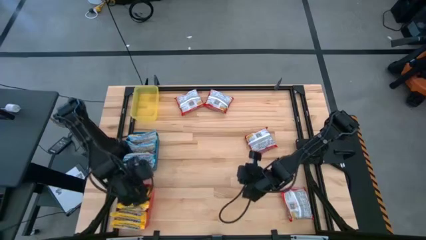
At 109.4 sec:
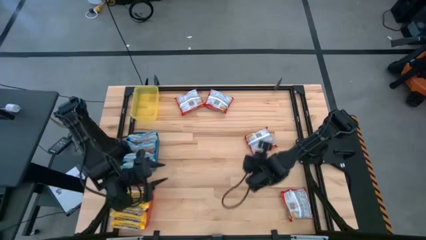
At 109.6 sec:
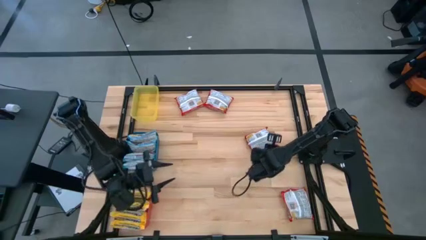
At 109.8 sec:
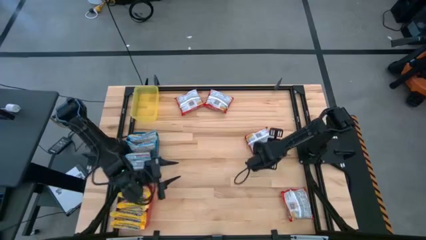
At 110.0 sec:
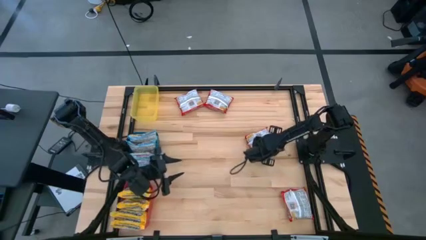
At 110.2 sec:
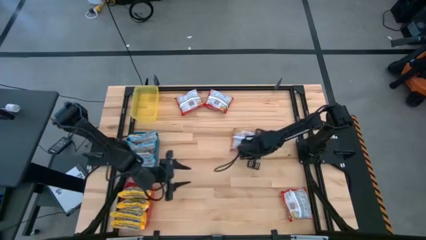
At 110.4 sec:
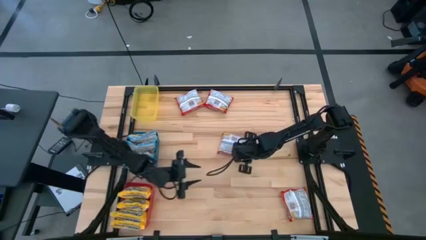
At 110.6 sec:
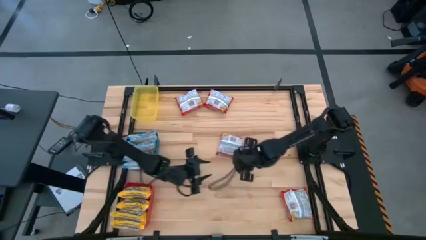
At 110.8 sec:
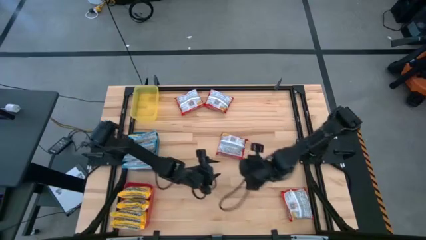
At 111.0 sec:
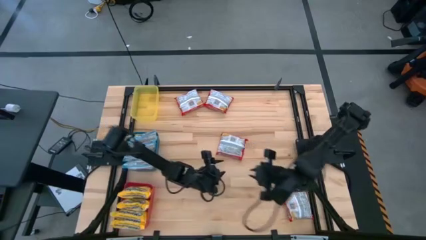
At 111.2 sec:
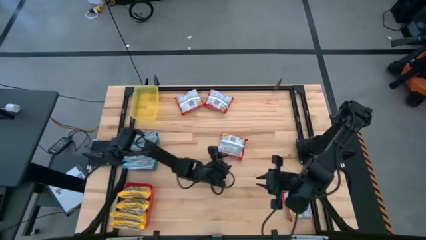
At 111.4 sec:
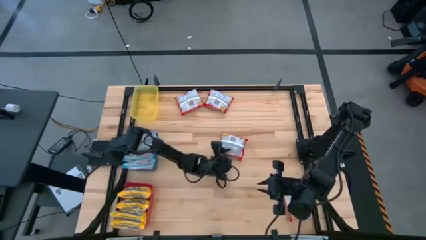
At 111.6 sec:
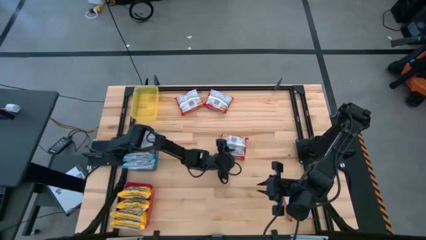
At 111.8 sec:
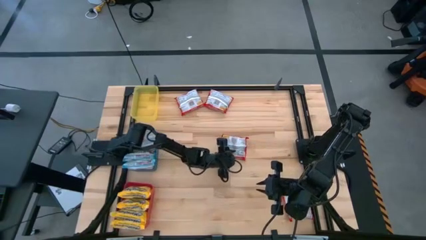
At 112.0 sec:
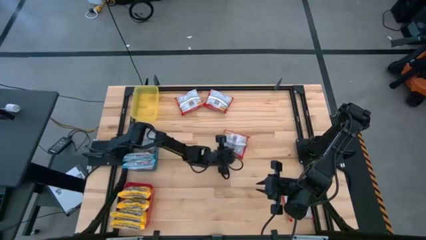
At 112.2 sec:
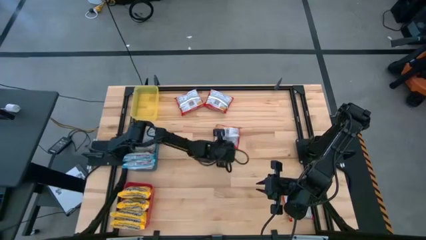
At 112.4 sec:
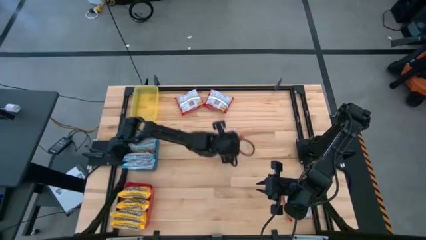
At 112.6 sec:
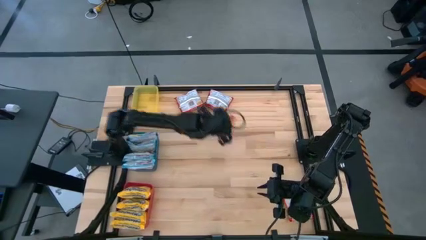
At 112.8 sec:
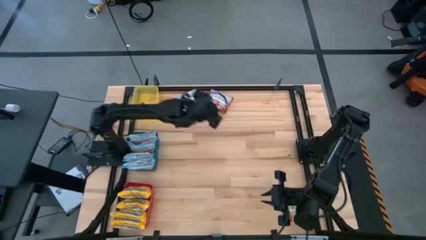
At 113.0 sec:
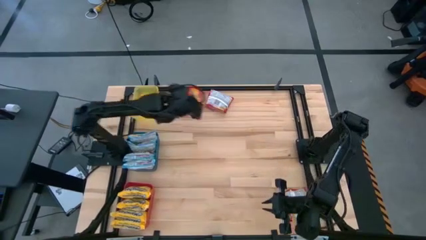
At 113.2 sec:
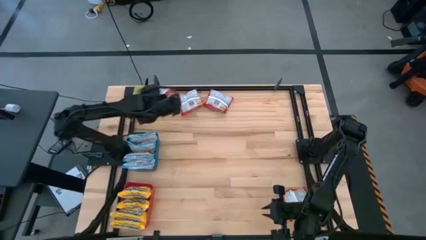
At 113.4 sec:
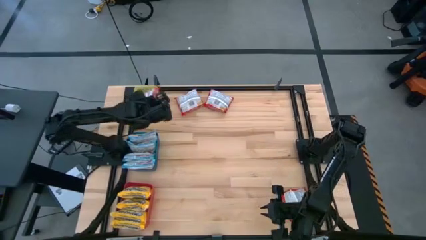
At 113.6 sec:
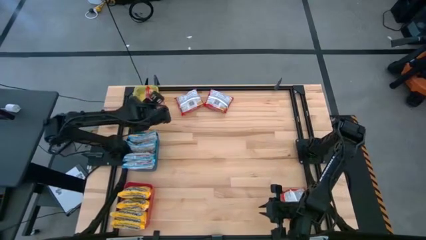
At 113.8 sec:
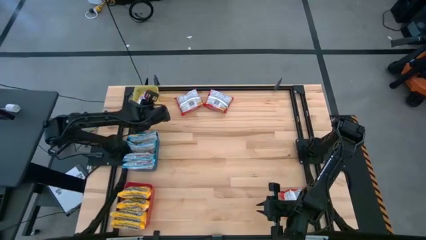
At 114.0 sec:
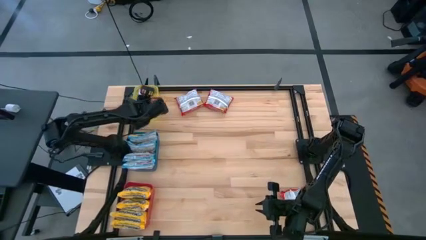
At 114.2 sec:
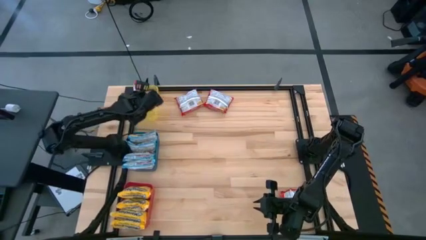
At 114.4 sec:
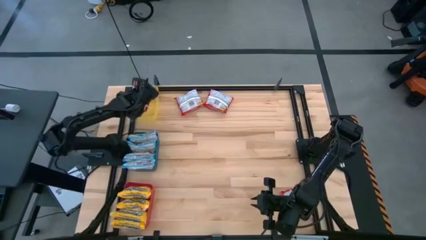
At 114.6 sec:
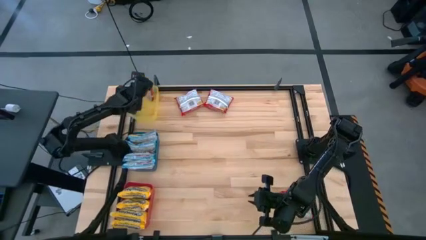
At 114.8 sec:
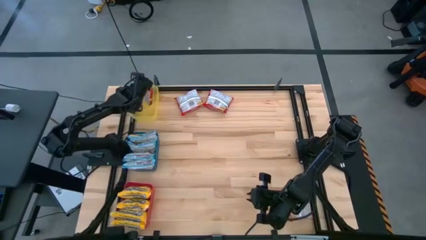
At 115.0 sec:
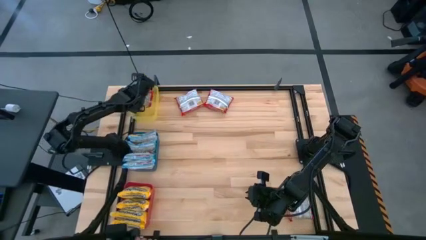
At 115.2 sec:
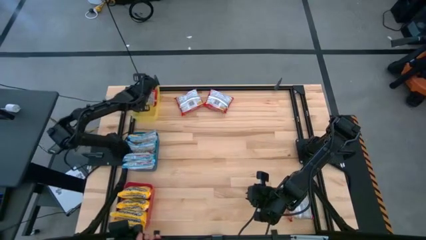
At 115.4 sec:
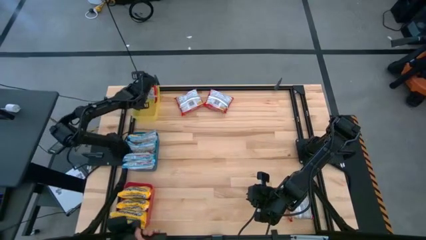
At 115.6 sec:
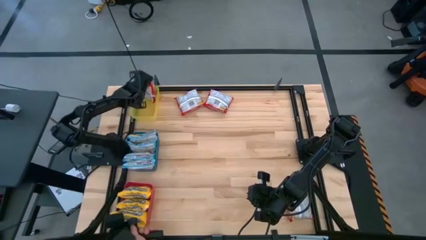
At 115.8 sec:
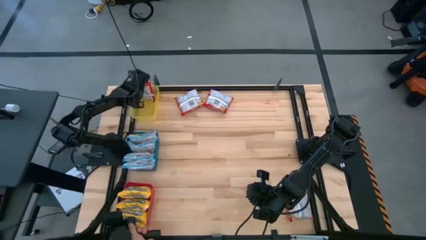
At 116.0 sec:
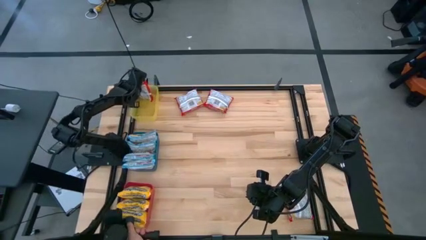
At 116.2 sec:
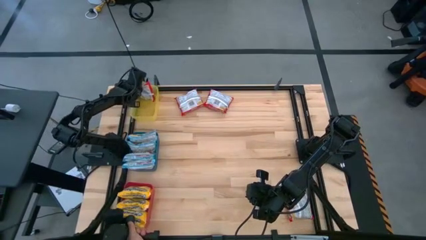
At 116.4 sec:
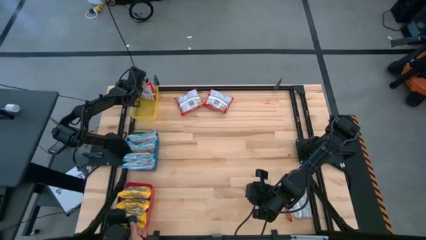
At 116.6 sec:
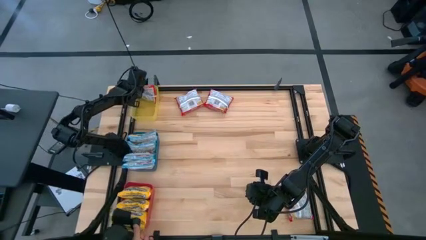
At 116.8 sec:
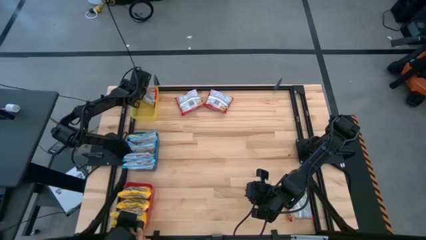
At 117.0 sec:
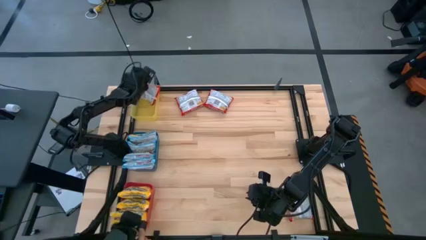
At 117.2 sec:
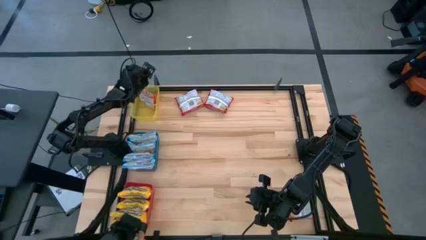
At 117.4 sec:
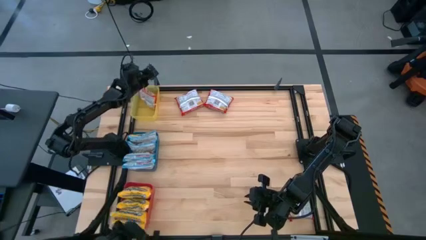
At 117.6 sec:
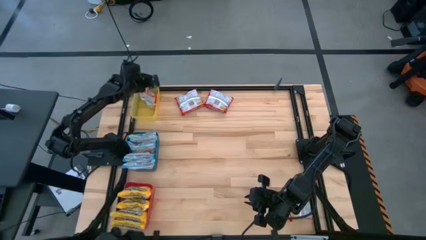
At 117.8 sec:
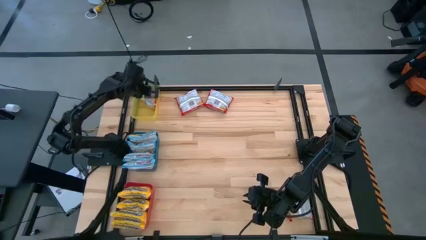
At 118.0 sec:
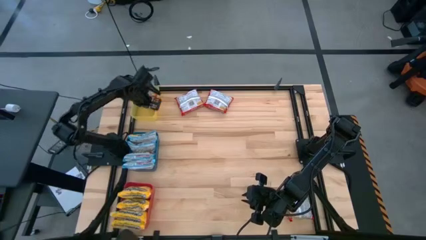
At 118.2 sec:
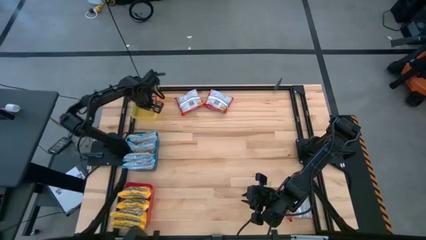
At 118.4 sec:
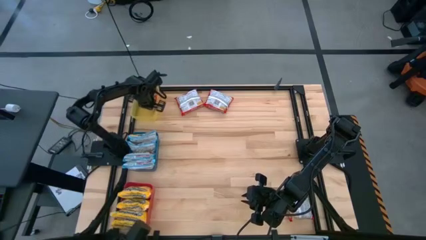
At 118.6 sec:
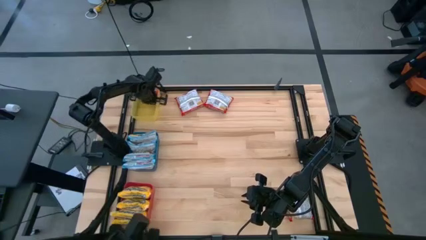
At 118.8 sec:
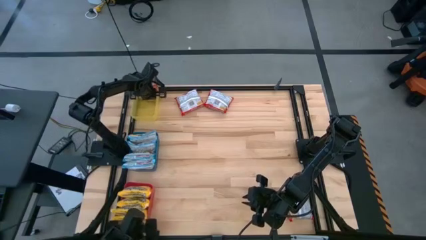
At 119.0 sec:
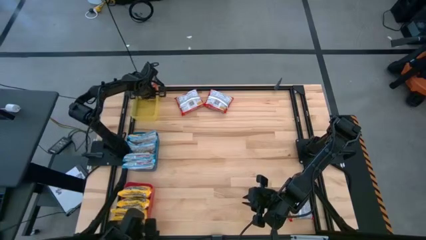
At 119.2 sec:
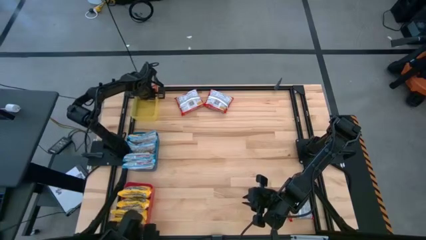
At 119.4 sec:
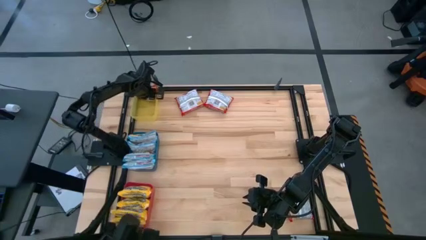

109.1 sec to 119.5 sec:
Task: Sort Maruchan noodles
Put the middle red noodle pack into the yellow bin

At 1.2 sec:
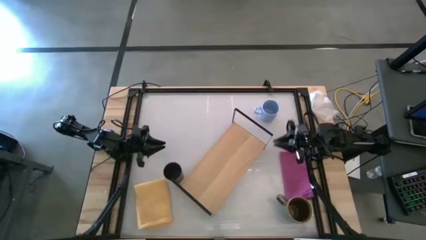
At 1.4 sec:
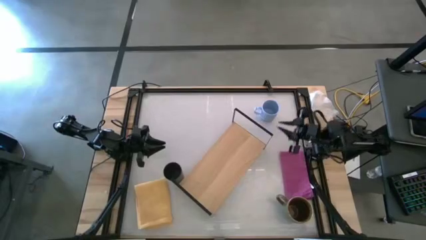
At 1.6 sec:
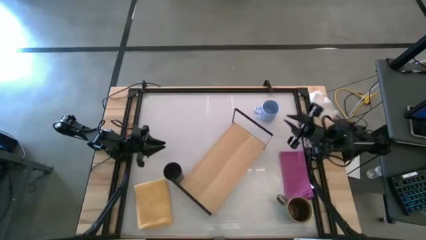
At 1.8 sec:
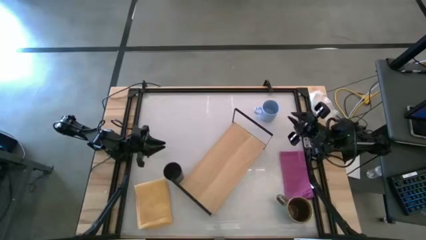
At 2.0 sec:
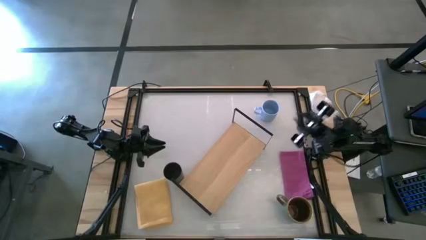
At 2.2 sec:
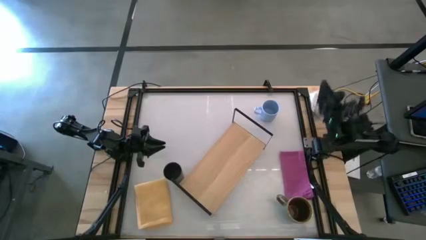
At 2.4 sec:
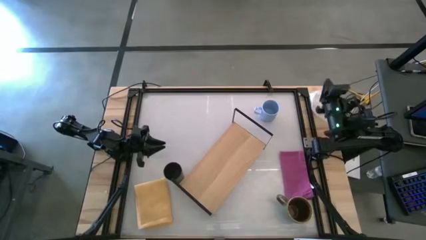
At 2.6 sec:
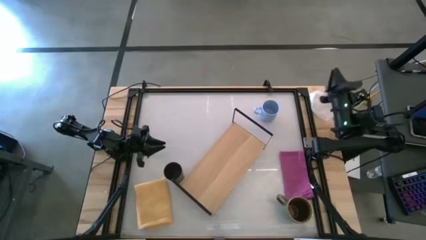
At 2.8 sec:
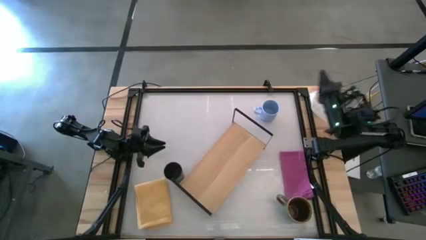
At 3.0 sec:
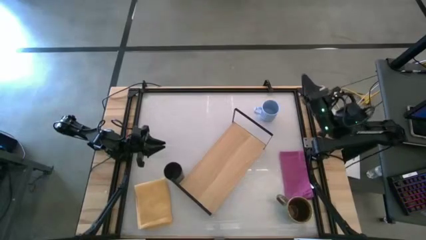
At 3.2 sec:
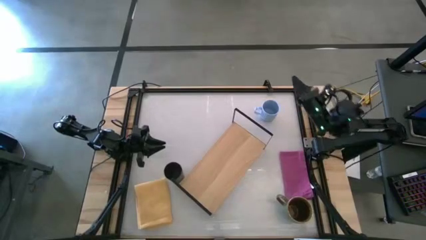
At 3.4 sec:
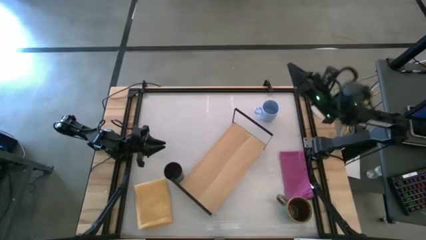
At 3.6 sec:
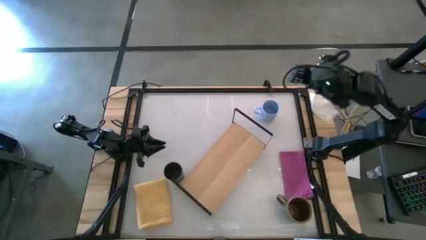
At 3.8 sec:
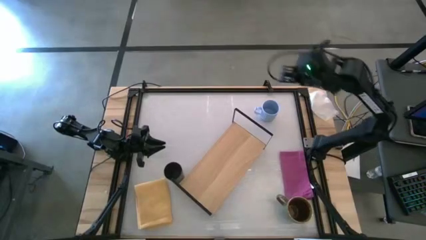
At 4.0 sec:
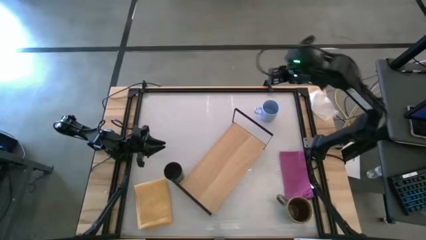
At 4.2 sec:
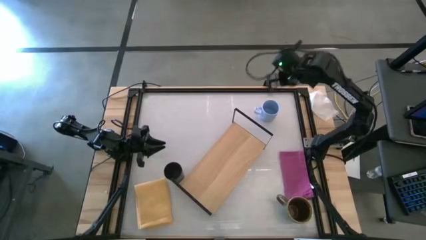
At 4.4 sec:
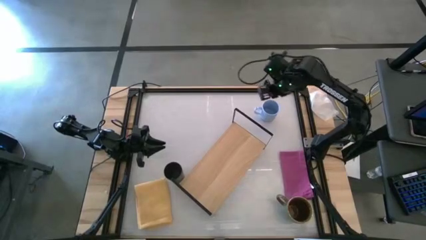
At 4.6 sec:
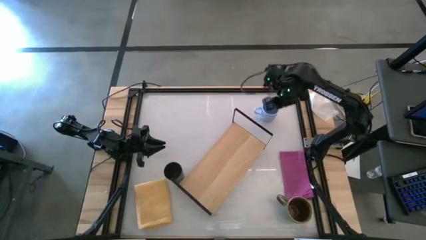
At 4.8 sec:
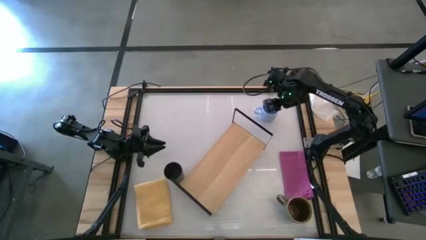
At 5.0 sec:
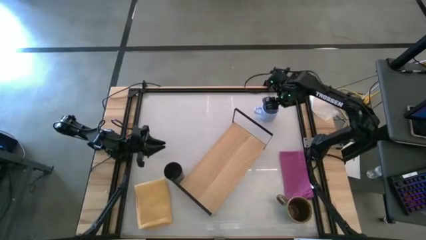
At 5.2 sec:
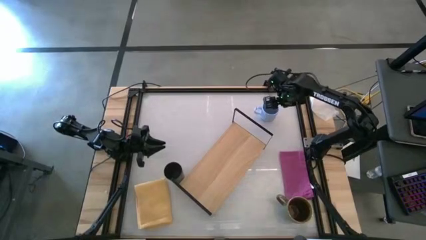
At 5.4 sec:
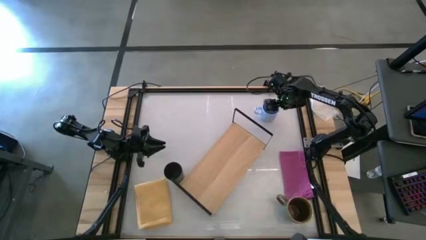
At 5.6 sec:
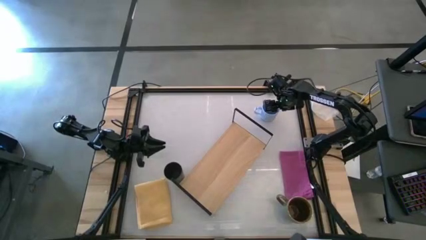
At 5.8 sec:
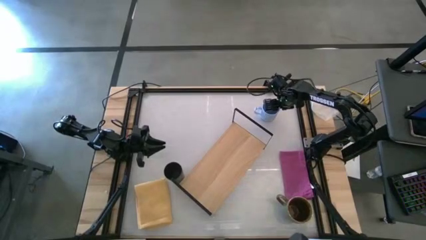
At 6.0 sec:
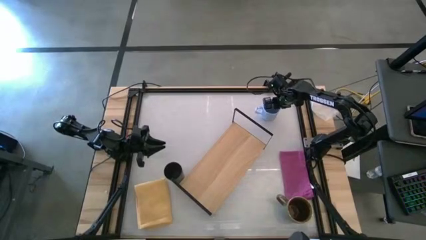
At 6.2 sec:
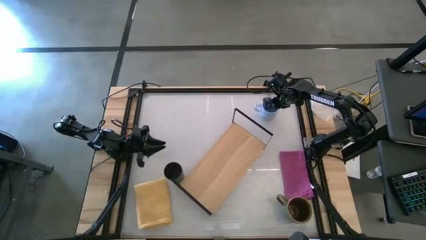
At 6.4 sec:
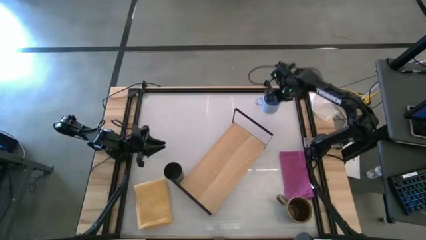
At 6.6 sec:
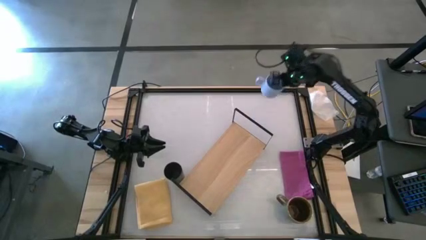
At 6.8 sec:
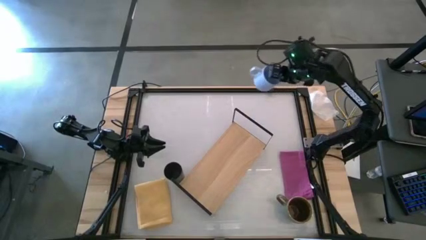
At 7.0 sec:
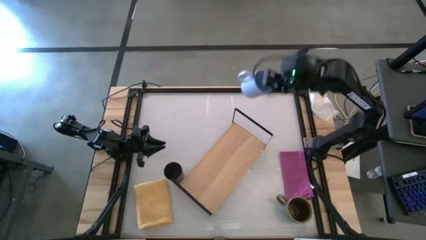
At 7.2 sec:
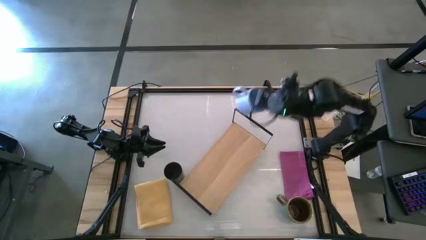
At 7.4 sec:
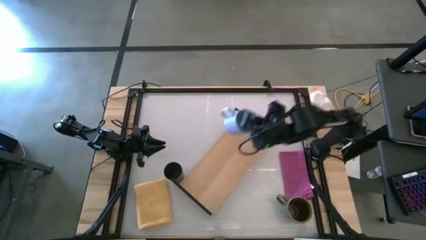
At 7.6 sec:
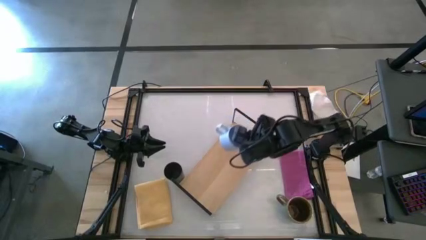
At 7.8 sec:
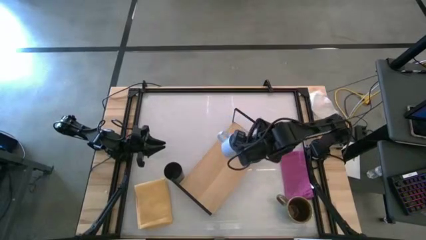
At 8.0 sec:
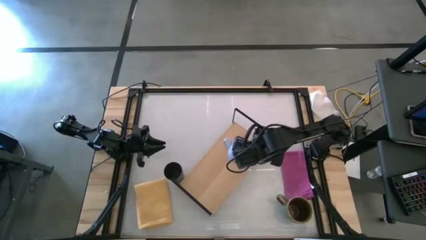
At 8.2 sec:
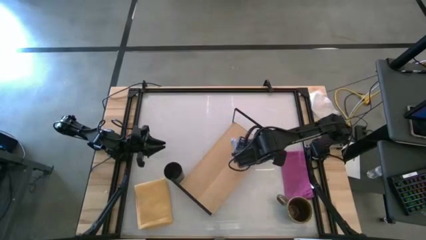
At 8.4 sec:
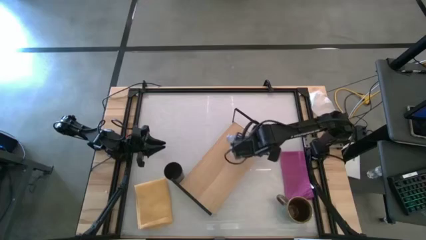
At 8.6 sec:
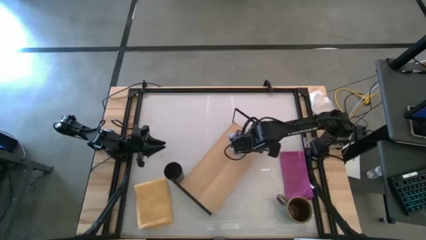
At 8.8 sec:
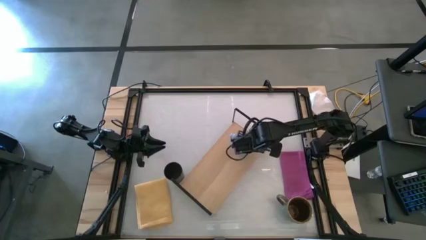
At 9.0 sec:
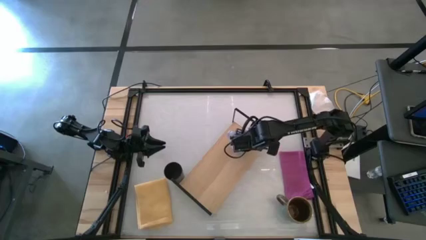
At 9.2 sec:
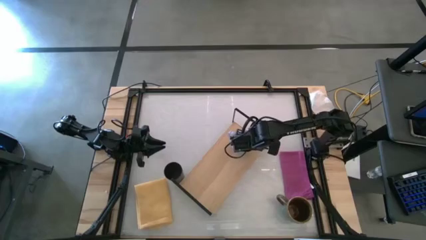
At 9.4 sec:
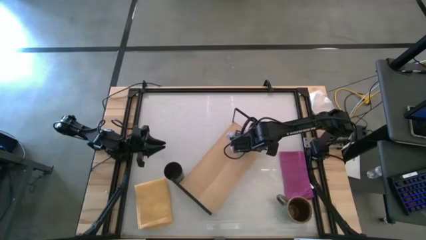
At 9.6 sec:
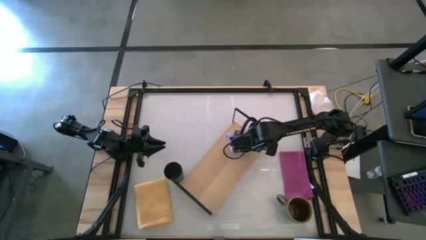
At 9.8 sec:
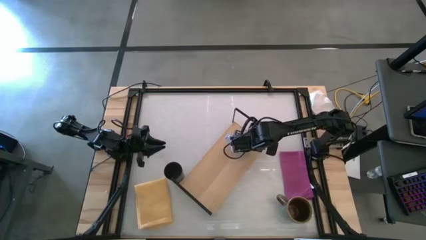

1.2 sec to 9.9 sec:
Task: Stack small to large cups/mugs on shelf
Put the blue mug on the shelf
